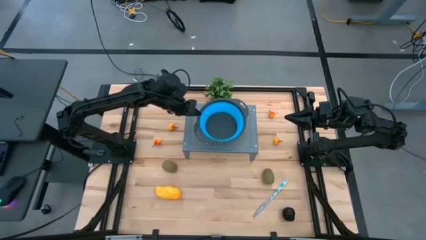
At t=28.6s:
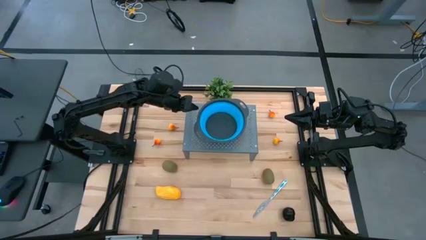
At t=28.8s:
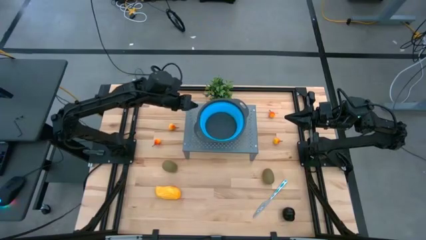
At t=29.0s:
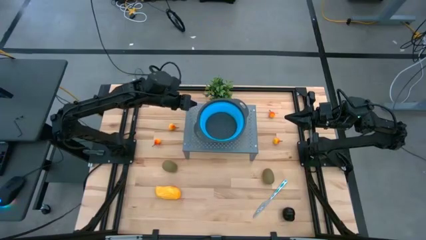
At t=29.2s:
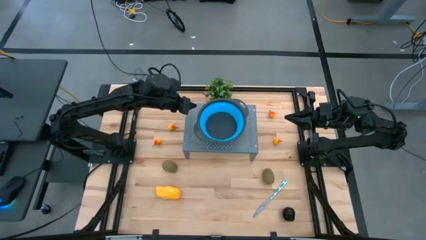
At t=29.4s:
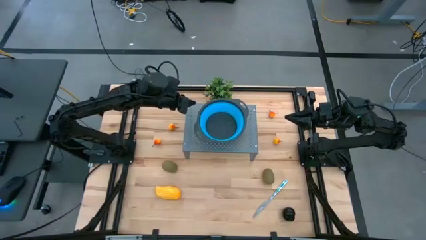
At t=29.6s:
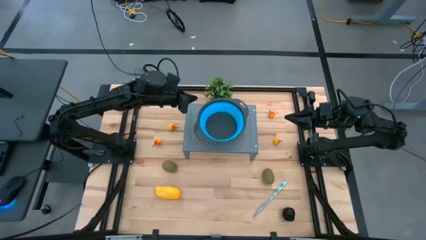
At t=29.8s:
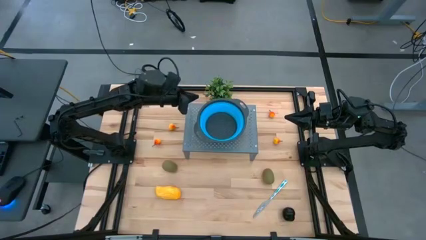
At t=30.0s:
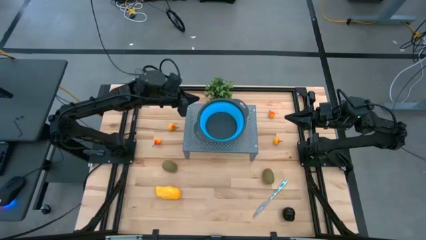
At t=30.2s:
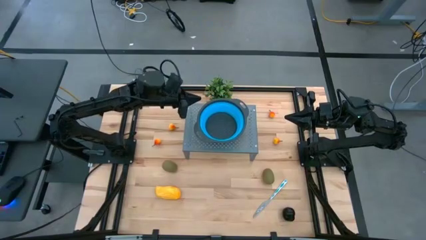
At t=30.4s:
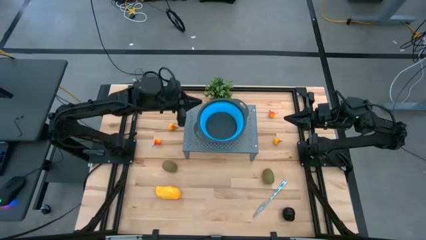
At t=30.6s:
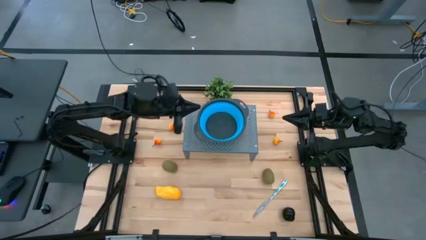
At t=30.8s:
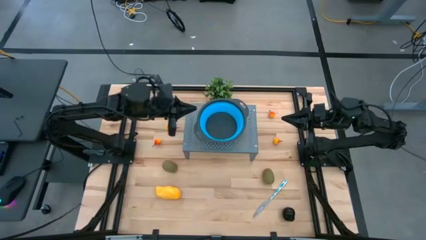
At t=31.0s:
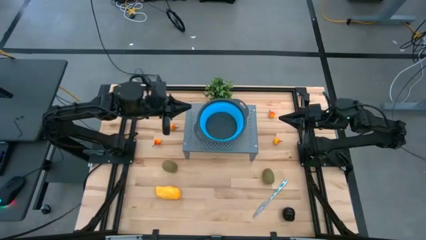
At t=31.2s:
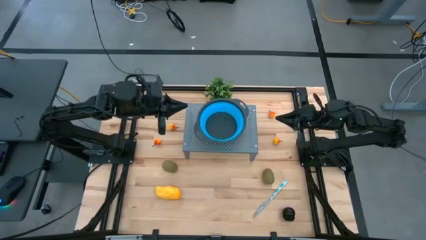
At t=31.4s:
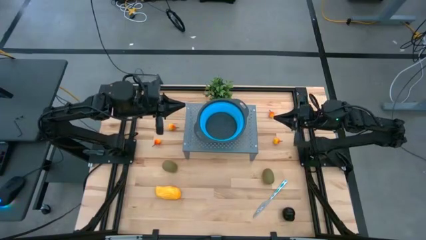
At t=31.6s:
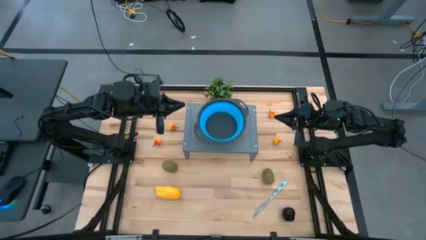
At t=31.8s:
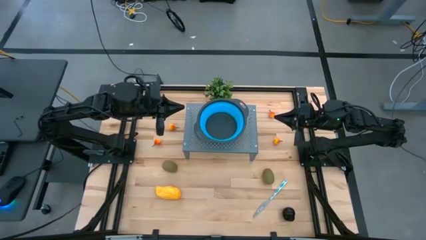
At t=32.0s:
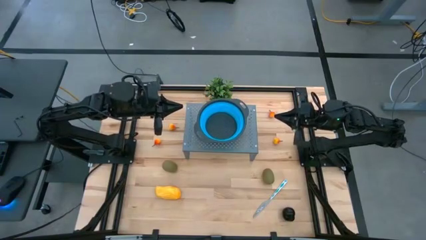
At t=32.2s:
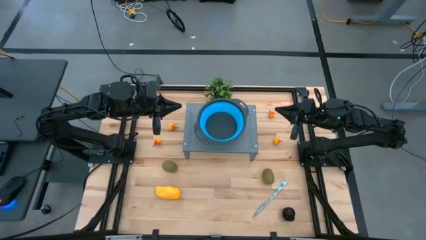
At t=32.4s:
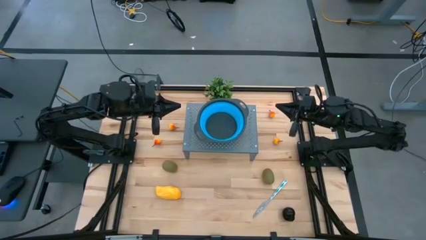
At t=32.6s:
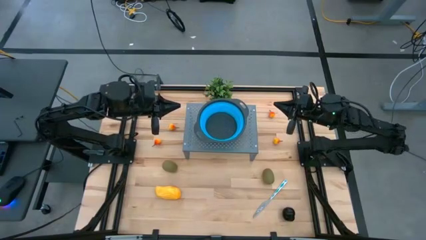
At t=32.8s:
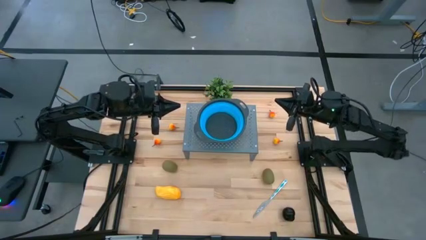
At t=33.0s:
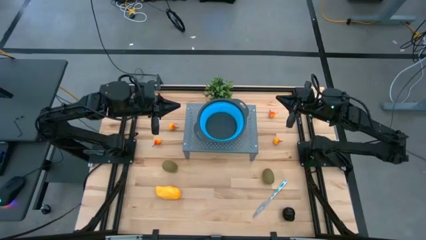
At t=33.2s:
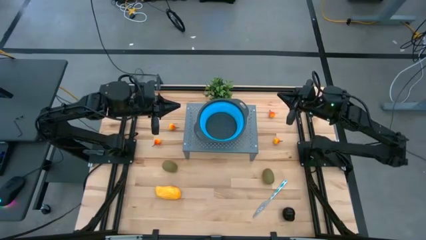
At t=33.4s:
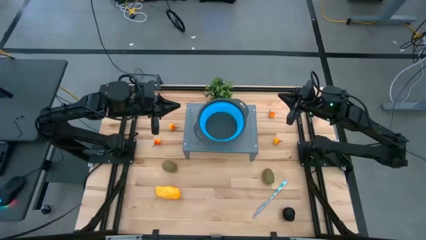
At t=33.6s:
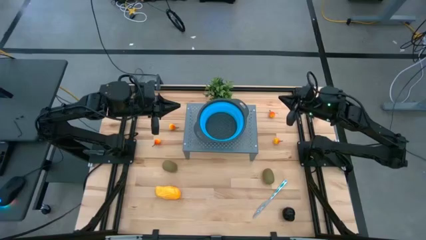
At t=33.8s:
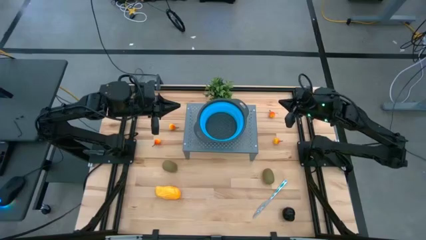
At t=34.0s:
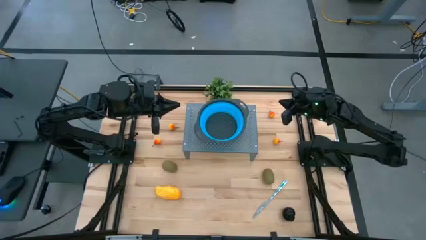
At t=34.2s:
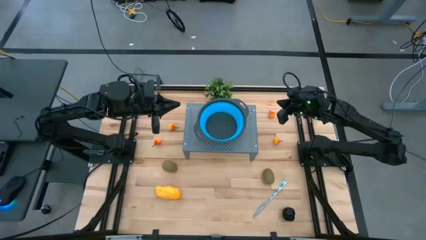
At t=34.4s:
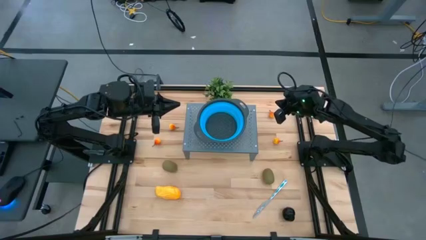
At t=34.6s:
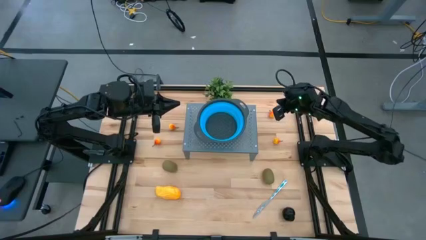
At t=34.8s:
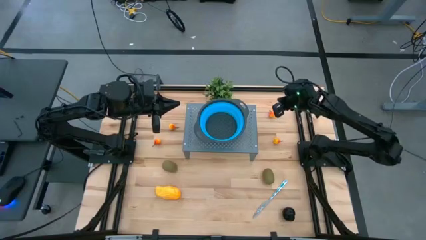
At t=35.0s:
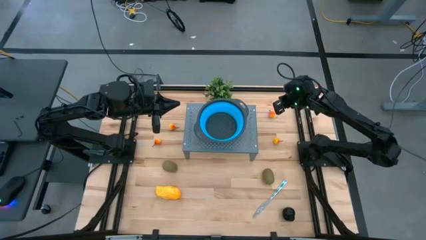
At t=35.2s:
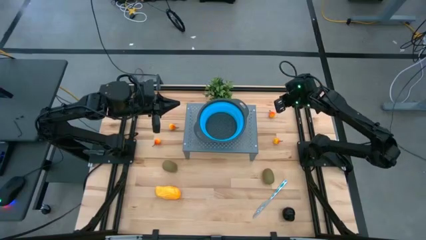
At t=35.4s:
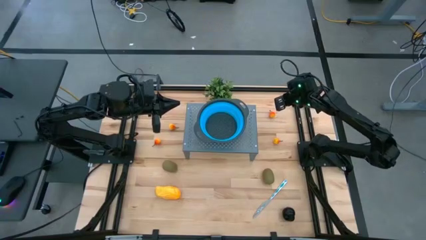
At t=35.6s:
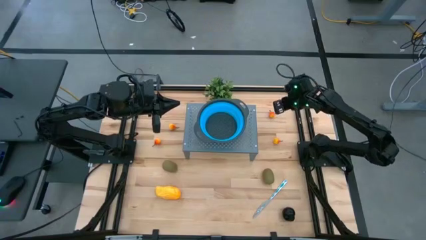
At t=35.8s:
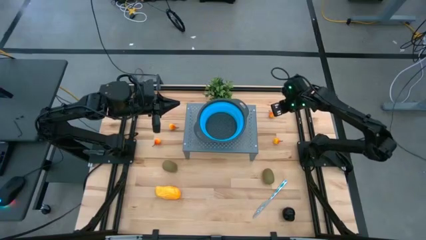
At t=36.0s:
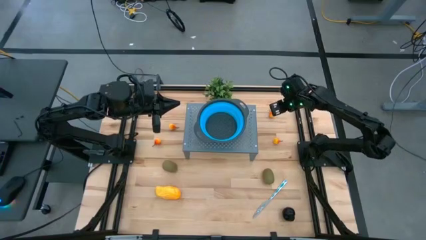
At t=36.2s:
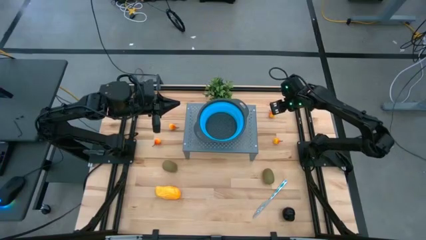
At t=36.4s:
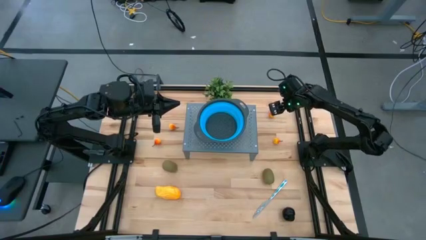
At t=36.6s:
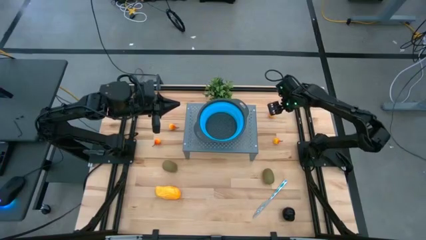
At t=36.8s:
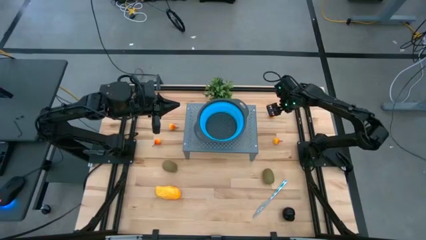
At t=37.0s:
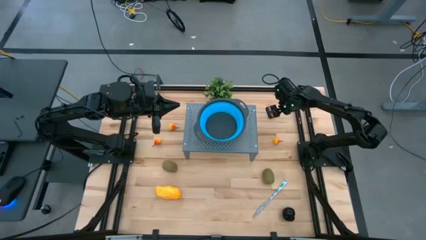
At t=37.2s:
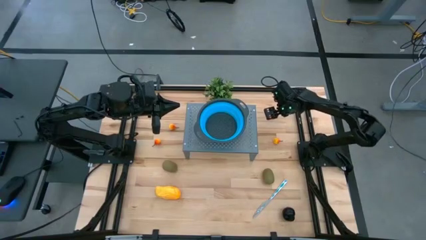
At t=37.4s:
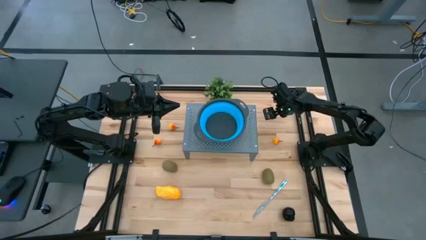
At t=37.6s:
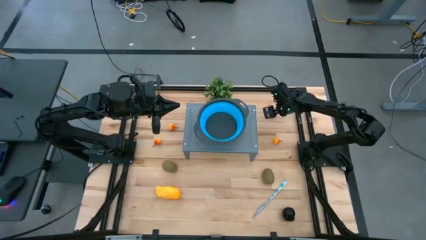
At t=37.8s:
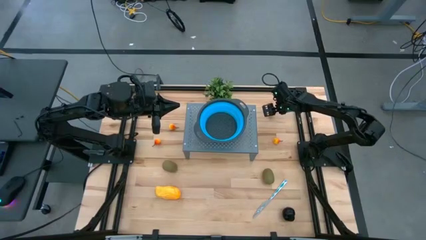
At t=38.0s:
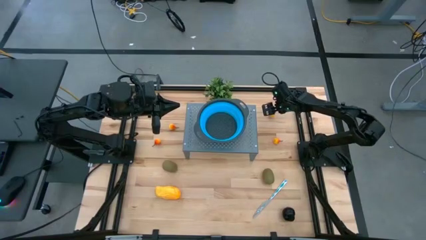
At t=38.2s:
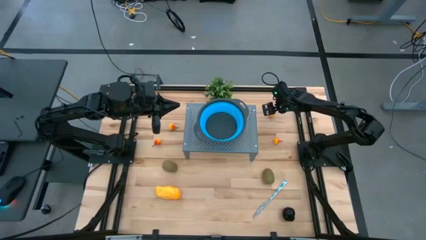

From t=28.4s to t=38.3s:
Task: Pick & Place Fruit
Put the orange pear into the strainer bowl on the shelf

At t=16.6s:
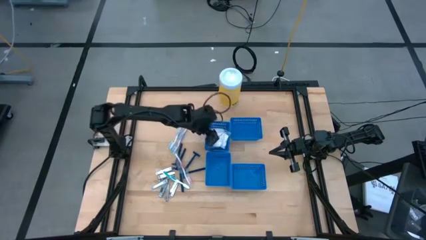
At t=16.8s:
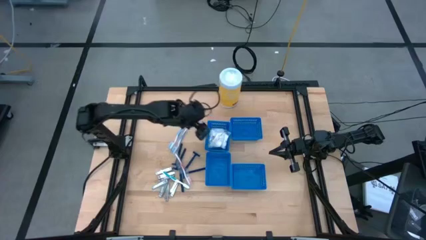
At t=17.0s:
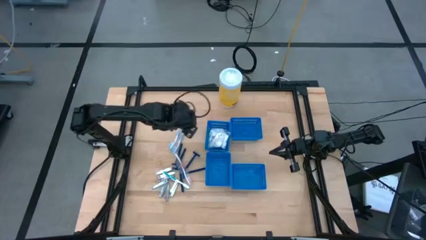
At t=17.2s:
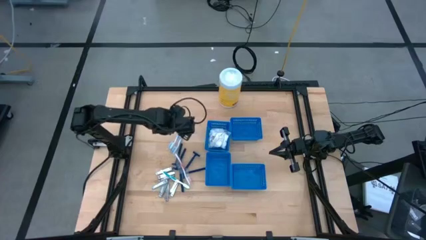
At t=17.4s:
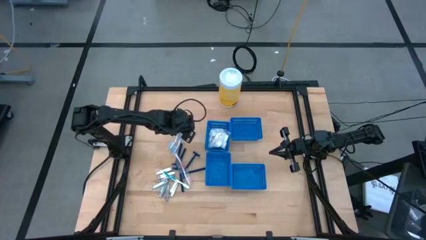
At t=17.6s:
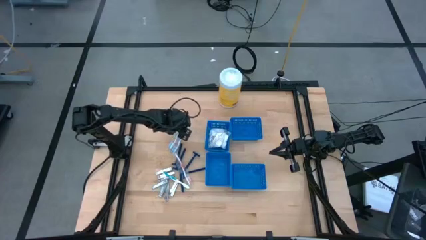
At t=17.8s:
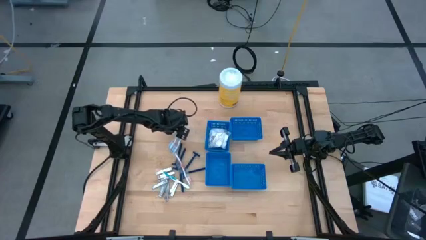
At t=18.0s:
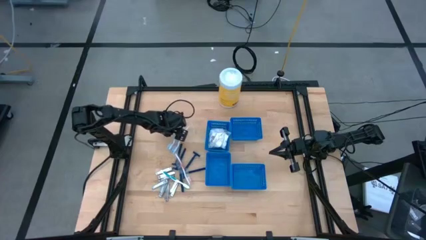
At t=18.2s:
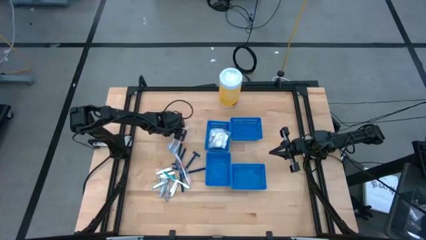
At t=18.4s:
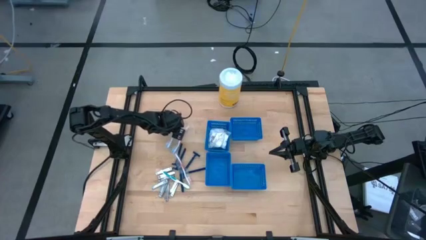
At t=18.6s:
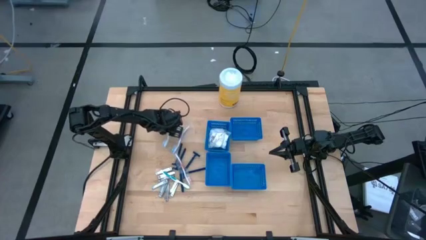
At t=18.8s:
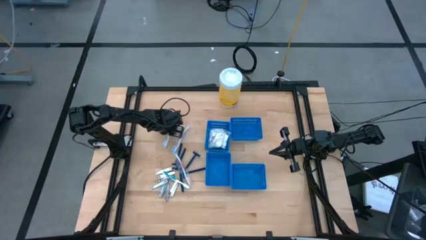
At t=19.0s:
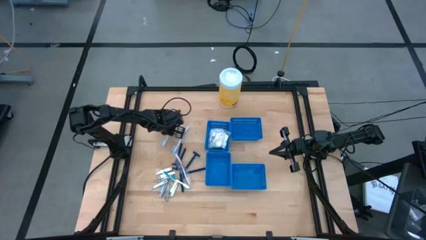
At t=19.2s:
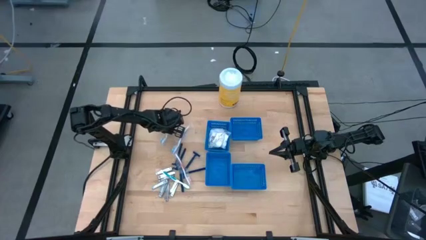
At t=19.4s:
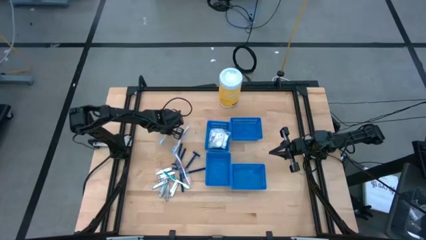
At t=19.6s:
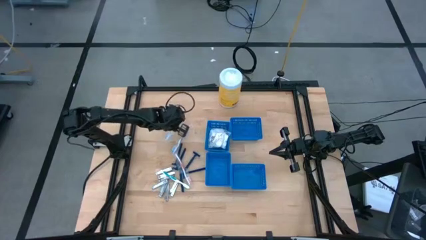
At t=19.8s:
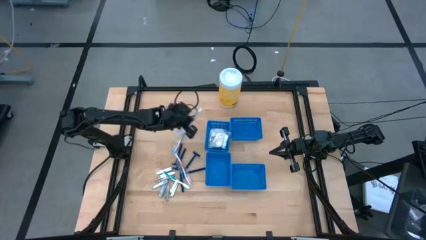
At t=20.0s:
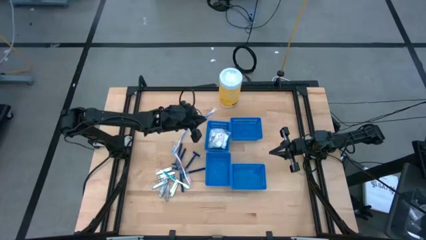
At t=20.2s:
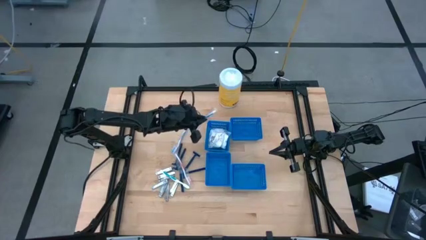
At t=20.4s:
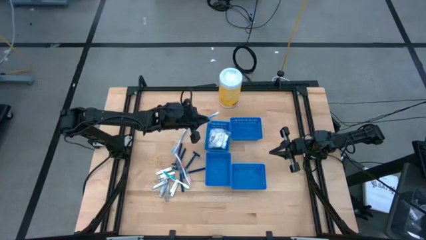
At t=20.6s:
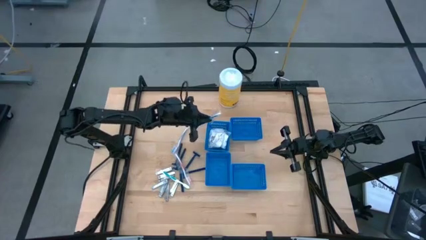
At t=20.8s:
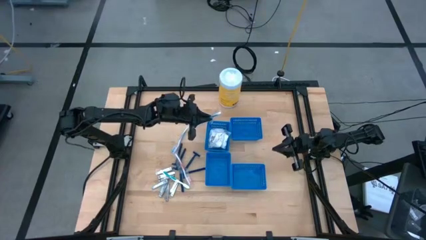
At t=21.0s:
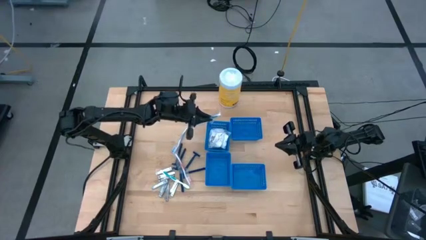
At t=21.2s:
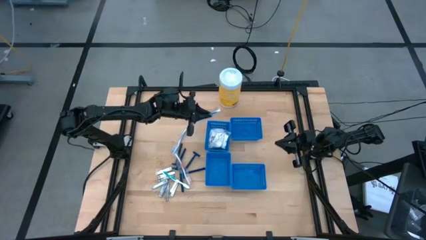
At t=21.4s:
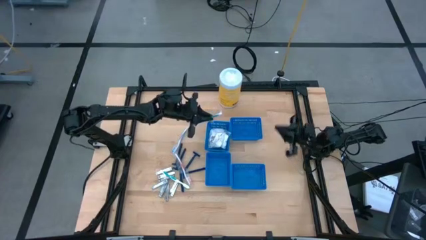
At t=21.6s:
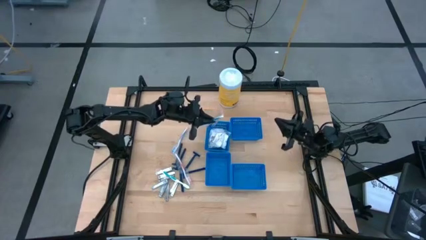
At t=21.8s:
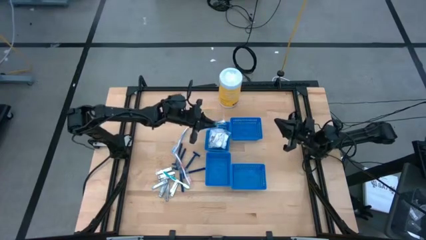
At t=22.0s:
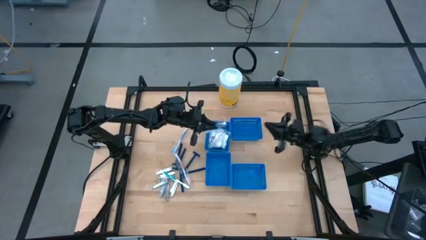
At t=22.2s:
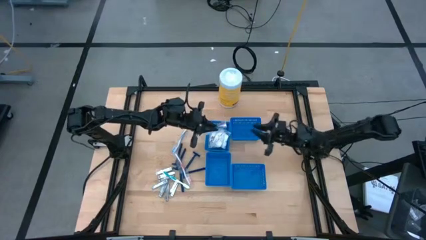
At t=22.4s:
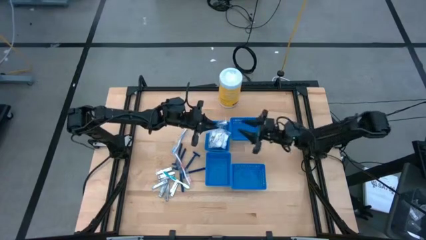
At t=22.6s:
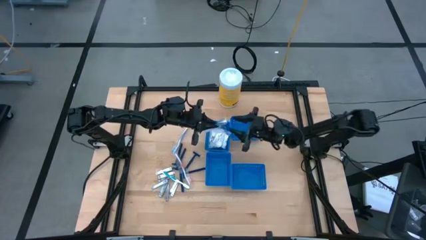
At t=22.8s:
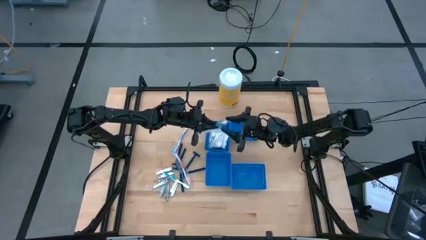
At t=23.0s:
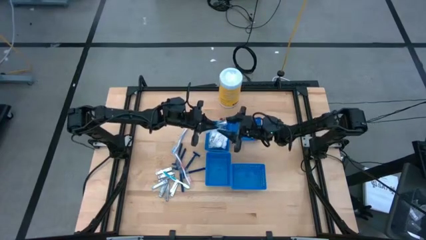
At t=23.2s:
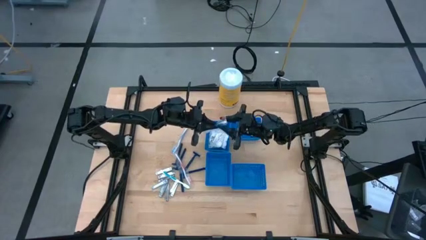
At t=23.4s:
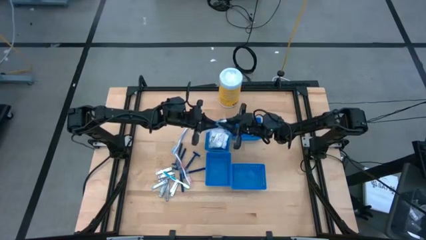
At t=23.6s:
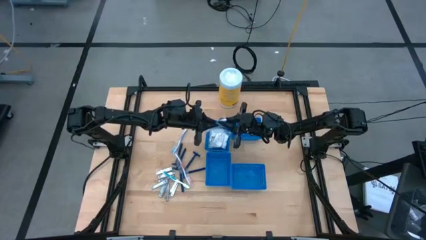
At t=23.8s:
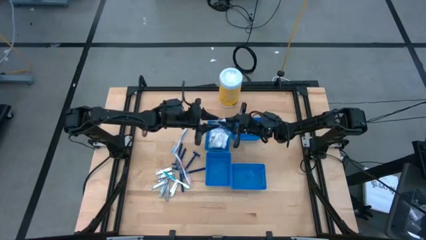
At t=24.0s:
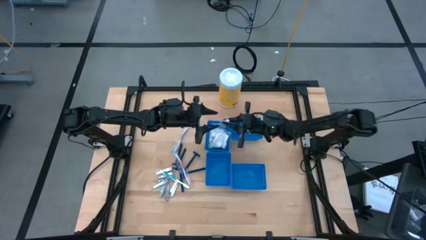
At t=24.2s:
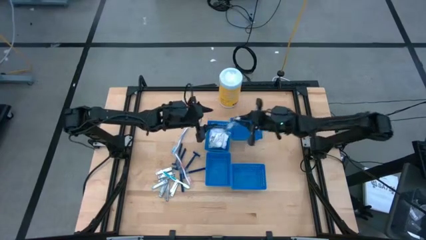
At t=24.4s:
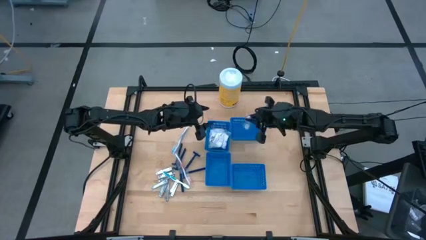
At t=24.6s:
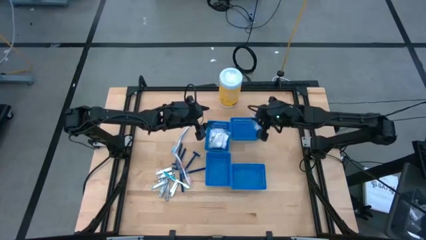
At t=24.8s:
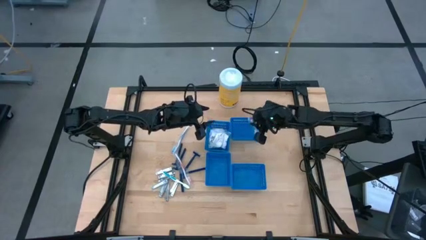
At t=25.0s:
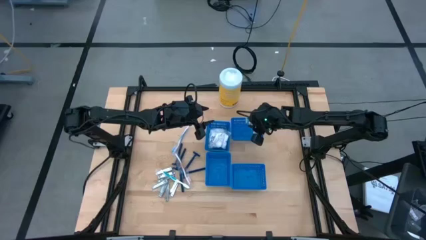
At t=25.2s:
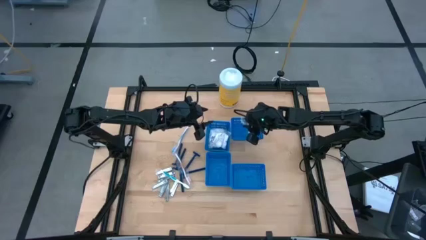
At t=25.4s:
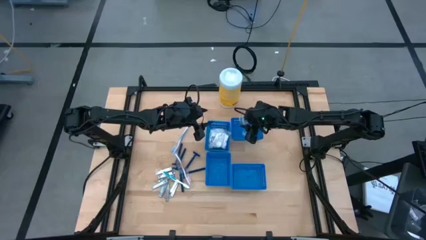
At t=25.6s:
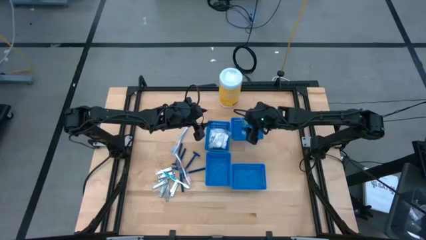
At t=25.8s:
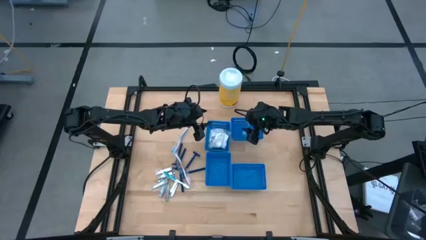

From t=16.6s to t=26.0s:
Task: Pick & Place Travel size toiletries
Put the blue toothbrush into the top right blue bin
